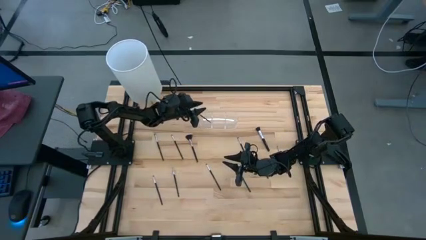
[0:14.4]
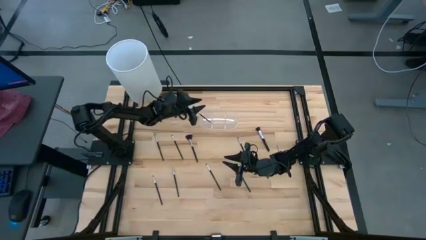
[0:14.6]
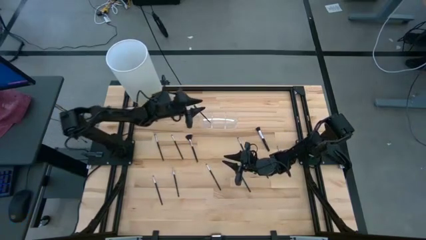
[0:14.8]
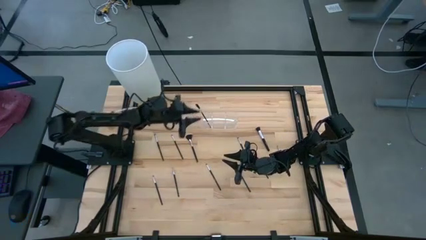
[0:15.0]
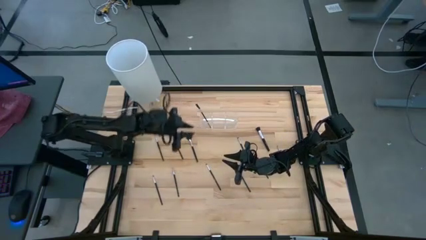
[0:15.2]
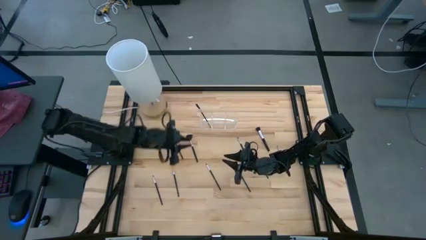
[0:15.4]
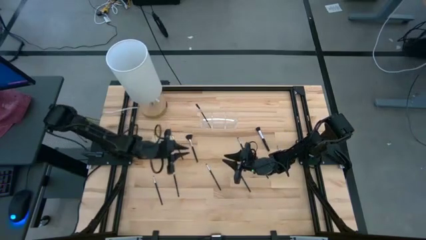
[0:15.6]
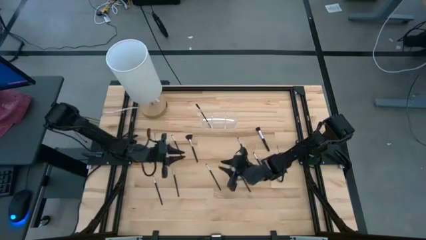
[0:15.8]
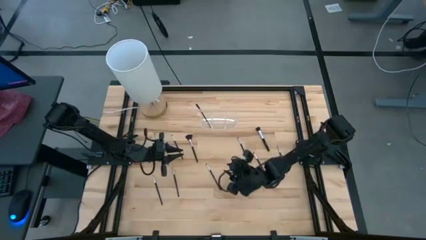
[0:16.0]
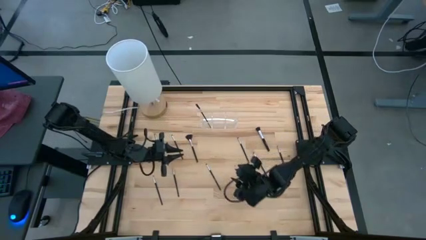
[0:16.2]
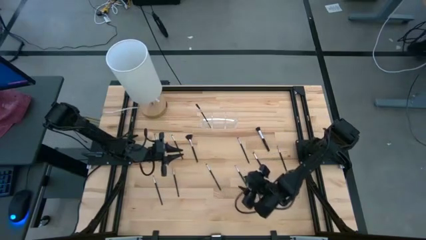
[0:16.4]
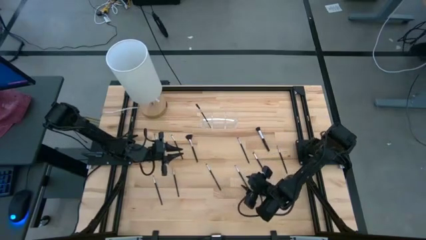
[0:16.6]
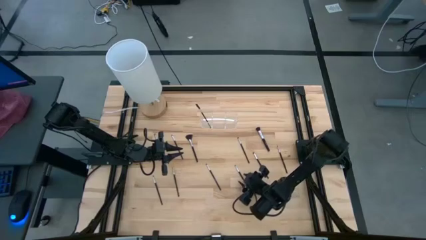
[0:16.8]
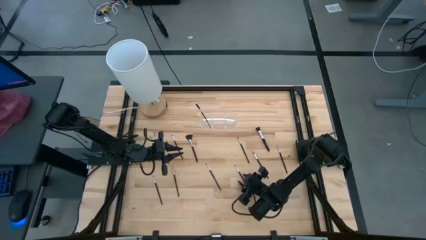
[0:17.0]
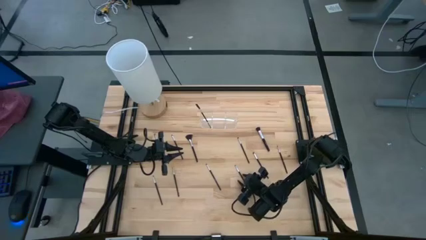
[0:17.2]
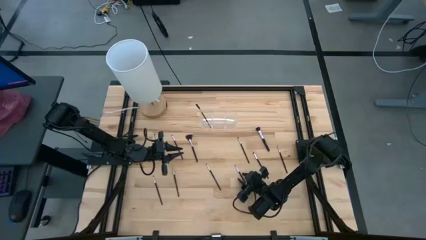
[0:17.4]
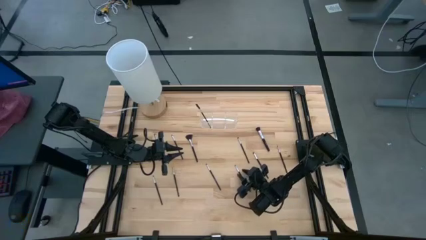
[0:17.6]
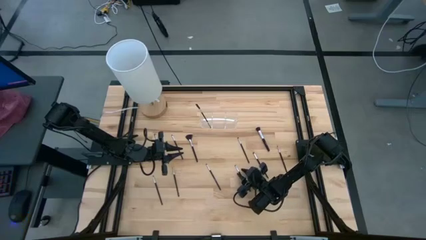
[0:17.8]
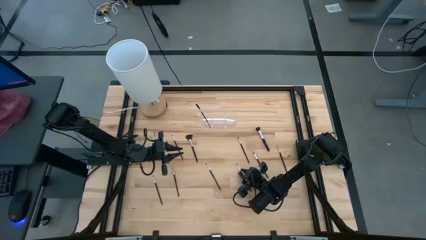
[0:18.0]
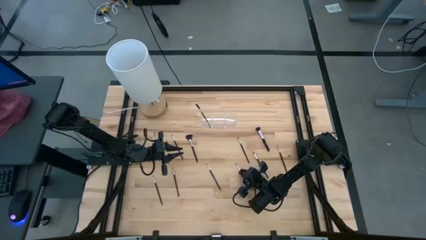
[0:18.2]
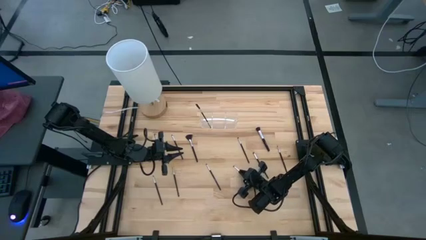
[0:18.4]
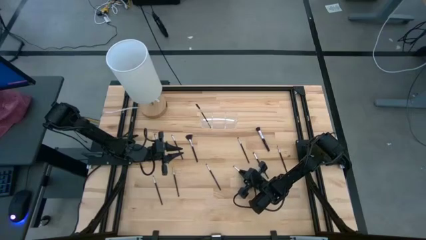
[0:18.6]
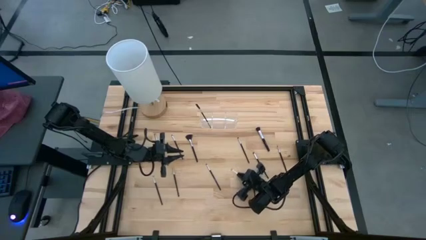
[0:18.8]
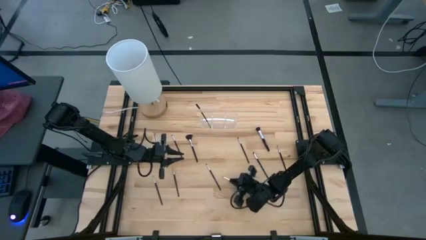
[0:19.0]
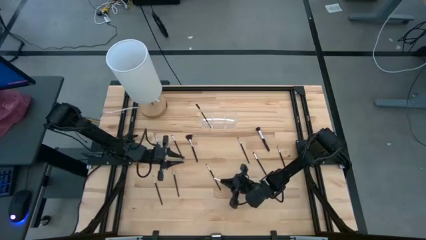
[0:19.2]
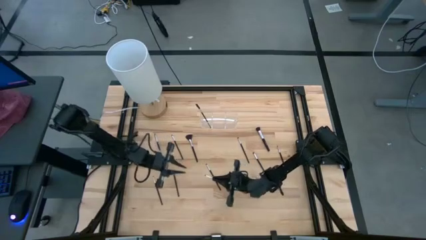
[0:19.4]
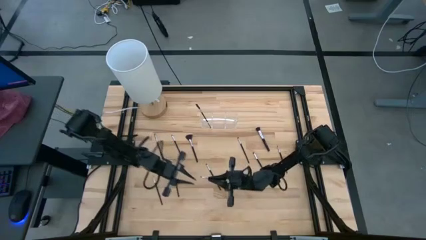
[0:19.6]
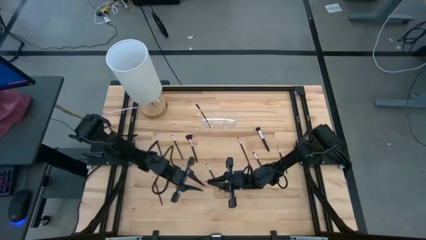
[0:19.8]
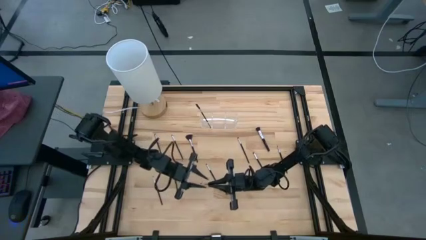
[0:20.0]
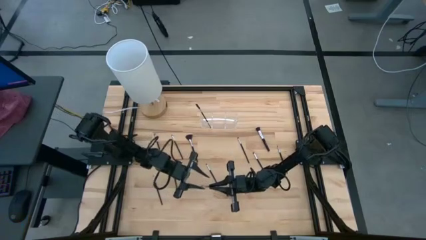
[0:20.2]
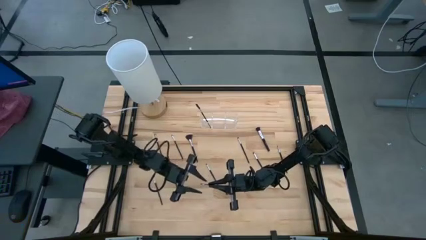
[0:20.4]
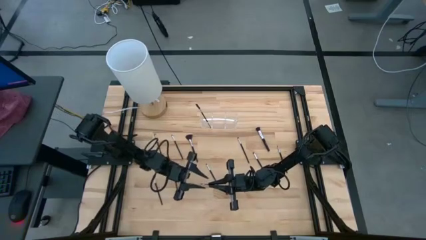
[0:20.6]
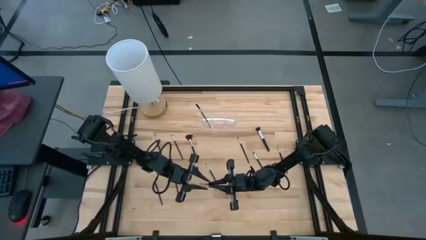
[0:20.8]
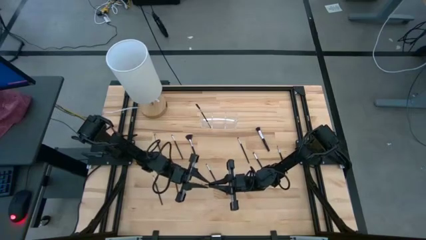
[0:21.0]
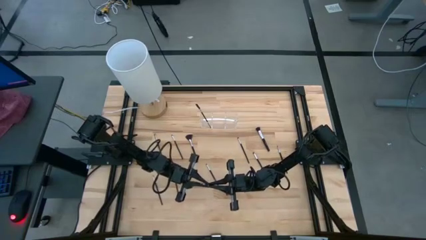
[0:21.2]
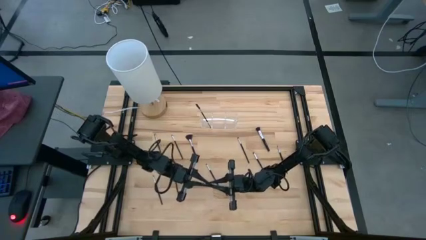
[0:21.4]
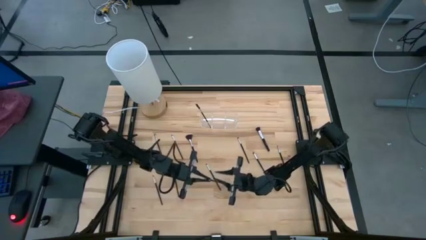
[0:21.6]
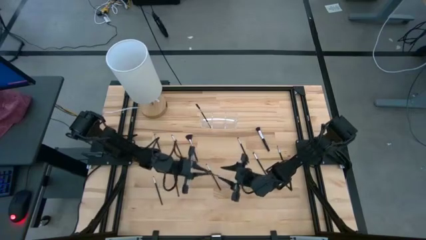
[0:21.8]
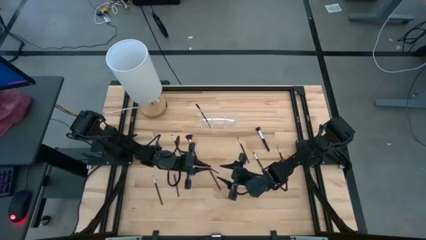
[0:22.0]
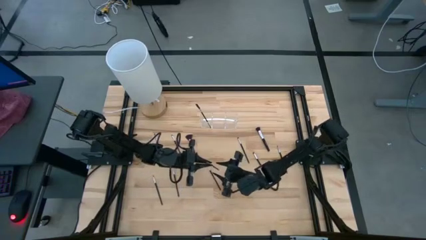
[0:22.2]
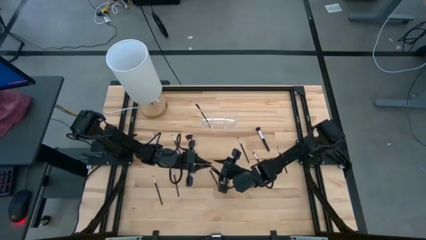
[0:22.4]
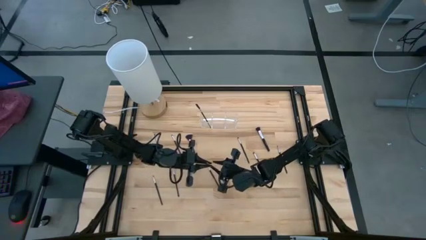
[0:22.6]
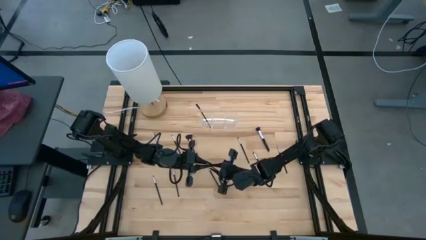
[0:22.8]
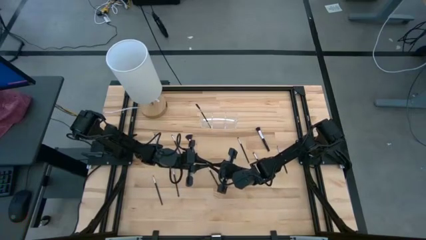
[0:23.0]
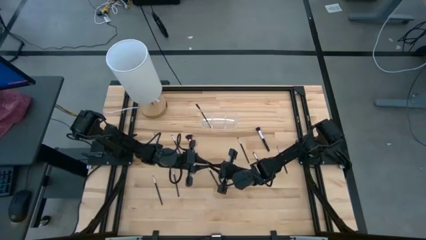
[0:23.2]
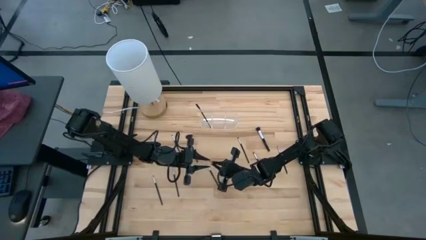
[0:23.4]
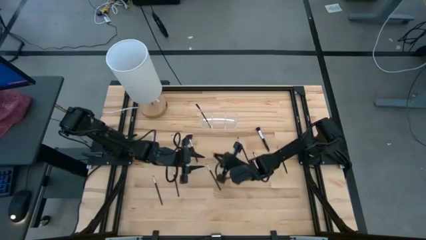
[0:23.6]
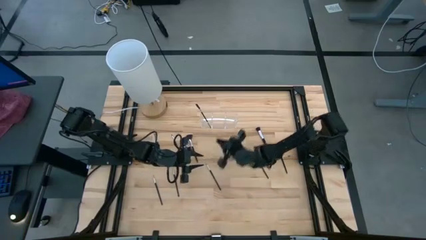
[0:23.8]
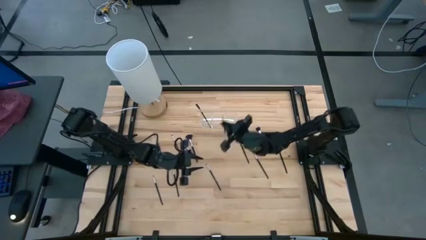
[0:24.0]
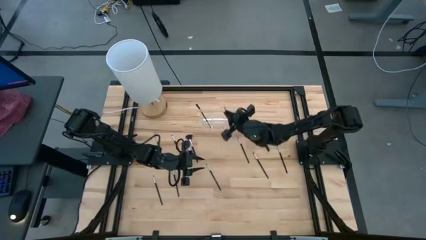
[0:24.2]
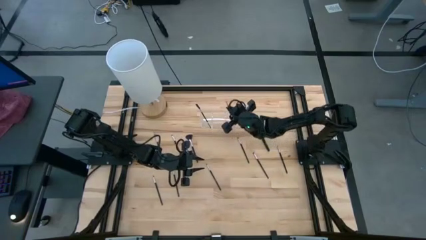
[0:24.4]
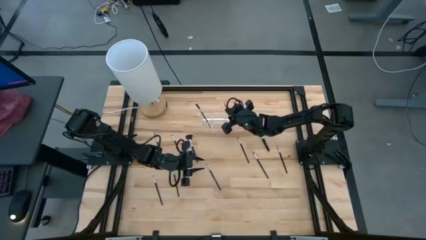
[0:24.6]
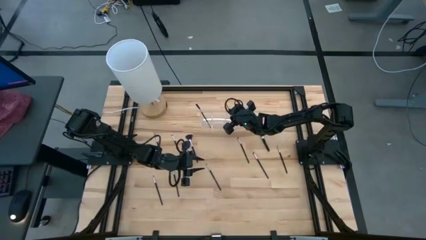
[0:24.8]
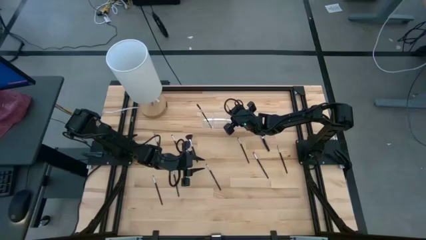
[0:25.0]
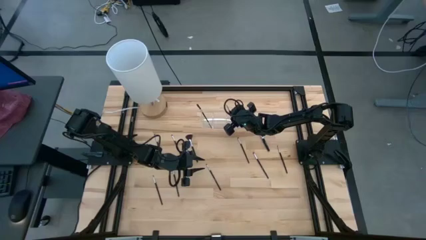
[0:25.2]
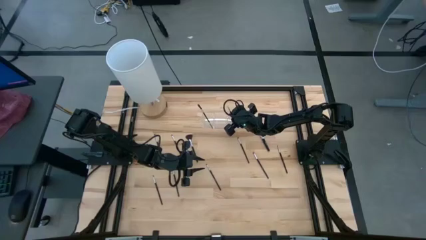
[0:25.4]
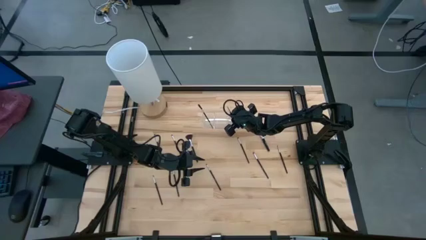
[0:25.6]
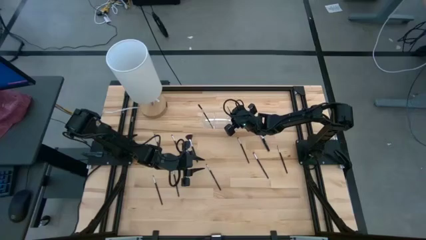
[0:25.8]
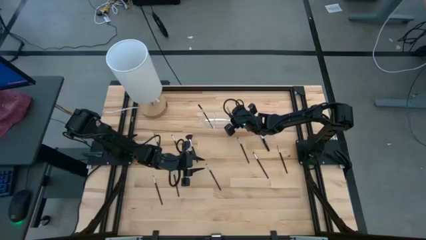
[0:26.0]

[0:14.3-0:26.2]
Task: Put items in baskets/containers
Put the black eyeshadow brush into the transparent organizer

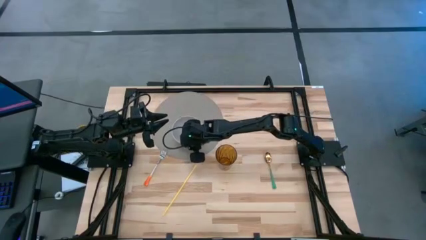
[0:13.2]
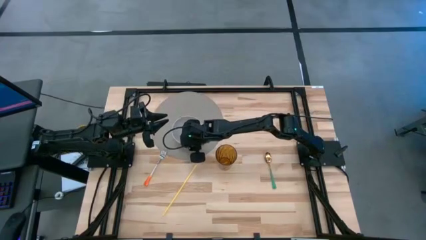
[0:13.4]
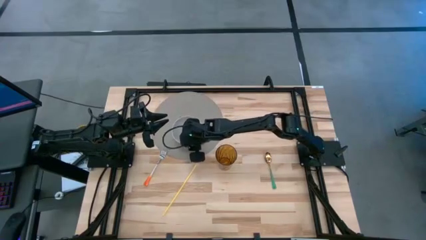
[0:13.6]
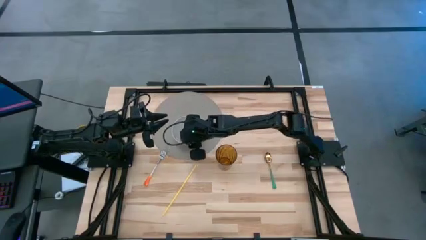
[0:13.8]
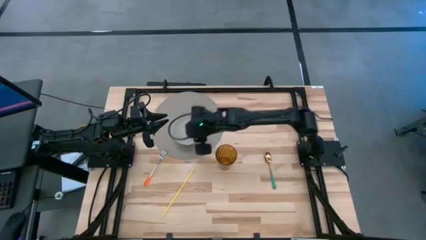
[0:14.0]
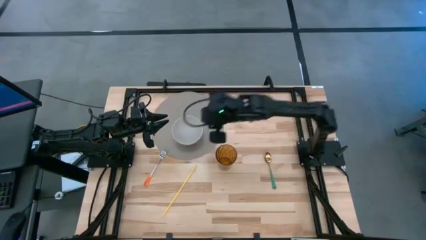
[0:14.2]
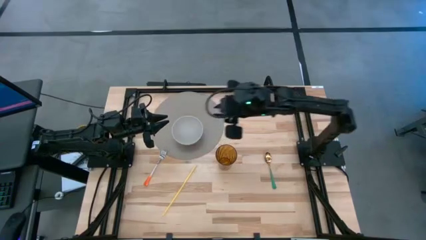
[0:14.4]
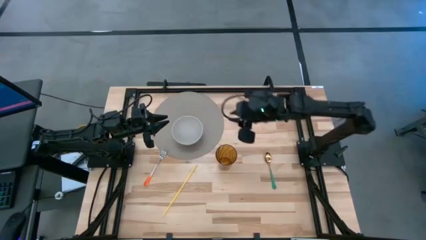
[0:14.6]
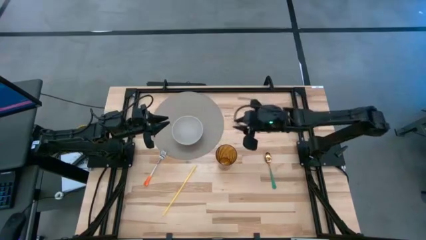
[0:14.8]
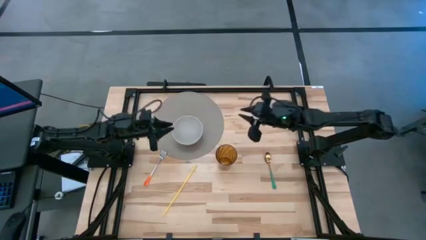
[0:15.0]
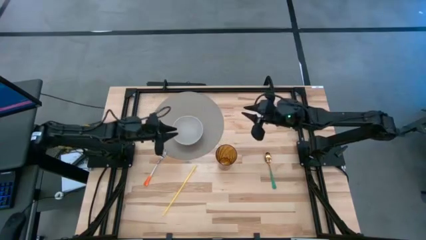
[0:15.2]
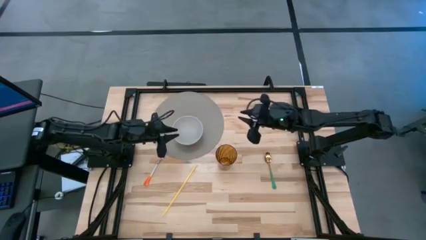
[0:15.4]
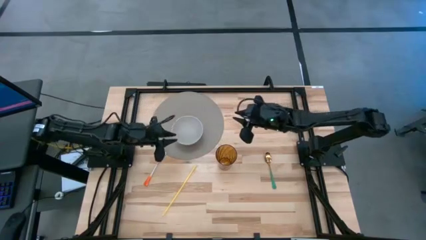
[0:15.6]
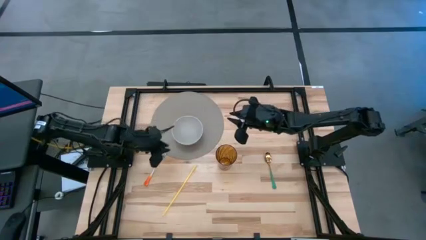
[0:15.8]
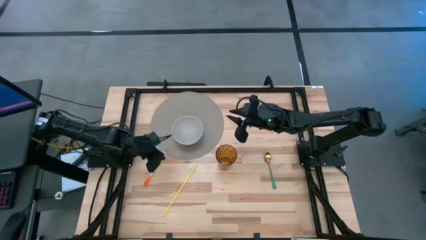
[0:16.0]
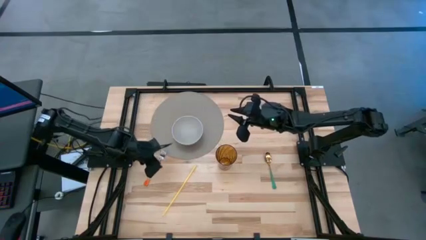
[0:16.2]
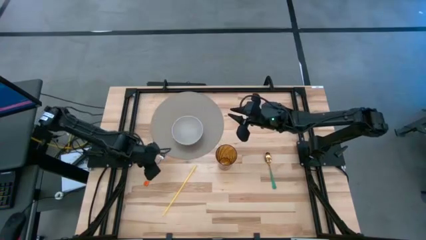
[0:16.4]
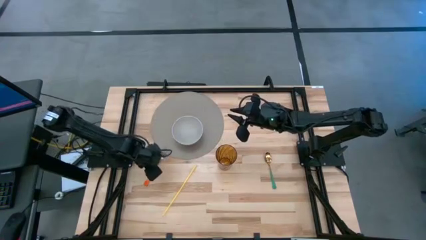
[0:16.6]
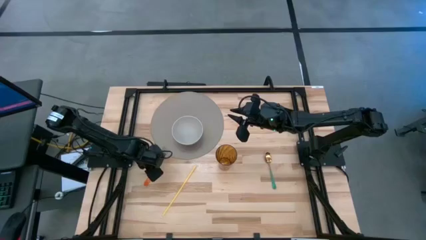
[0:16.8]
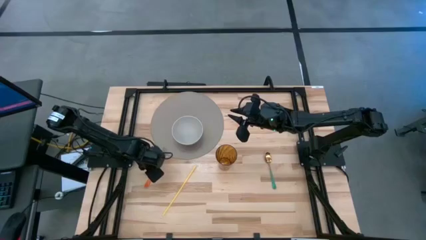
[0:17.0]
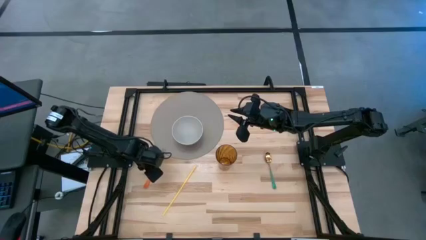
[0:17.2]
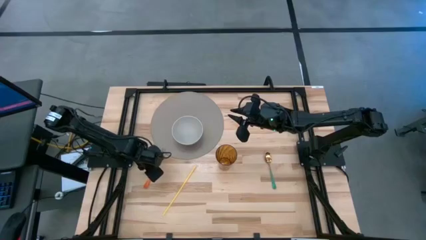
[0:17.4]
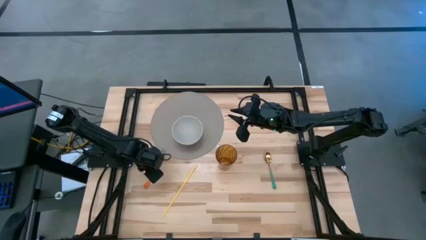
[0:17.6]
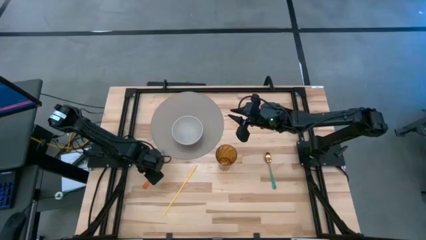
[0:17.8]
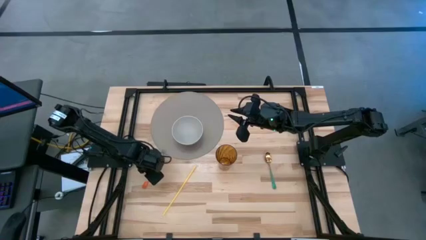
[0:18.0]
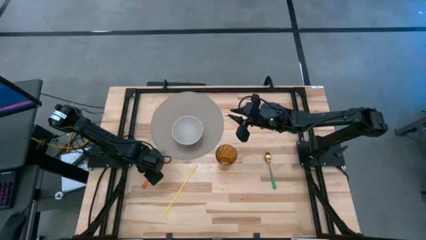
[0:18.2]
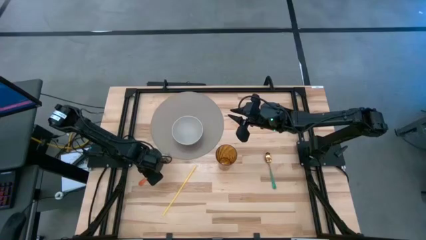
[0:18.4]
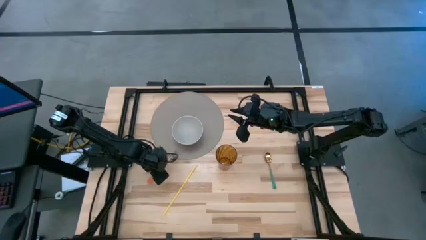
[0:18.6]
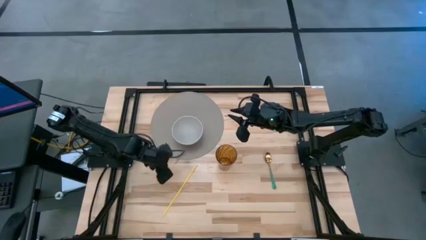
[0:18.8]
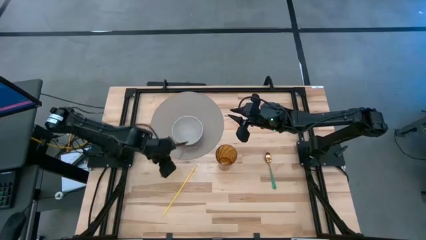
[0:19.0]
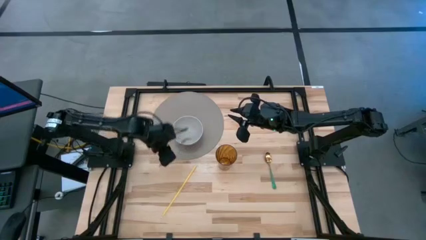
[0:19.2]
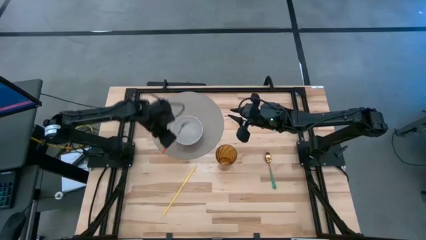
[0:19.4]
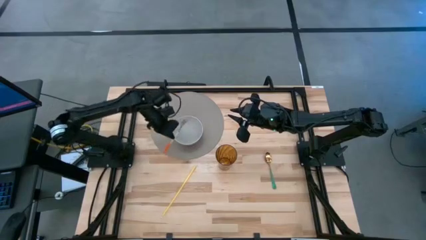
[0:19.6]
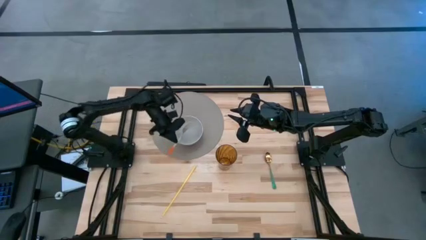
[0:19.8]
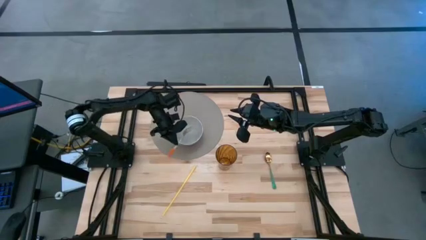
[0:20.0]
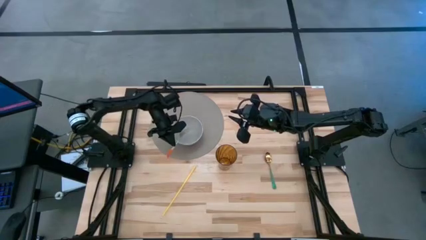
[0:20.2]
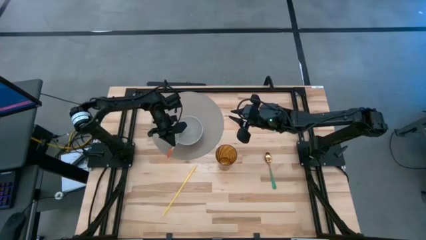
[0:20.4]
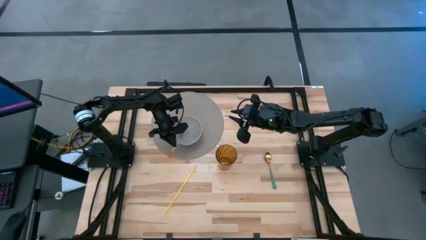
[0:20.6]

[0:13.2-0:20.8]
Task: Pick & Place Utensil
Put the fork into the bowl on the table placemat
